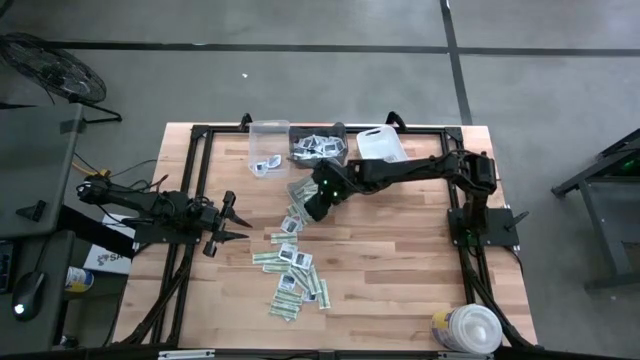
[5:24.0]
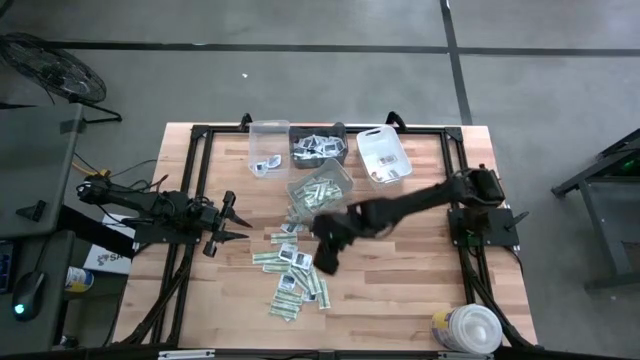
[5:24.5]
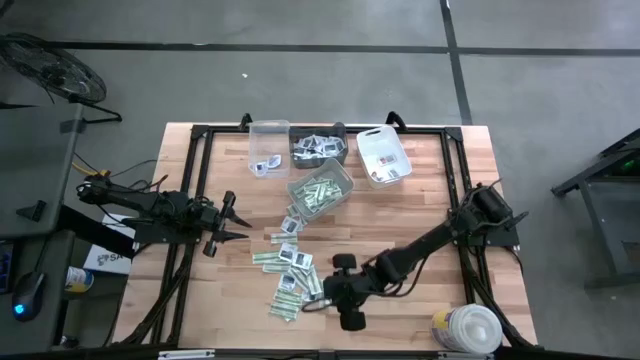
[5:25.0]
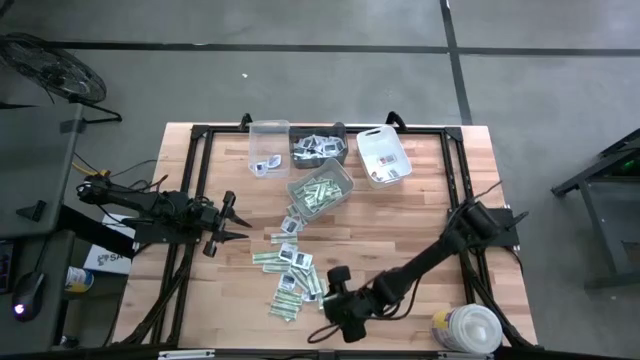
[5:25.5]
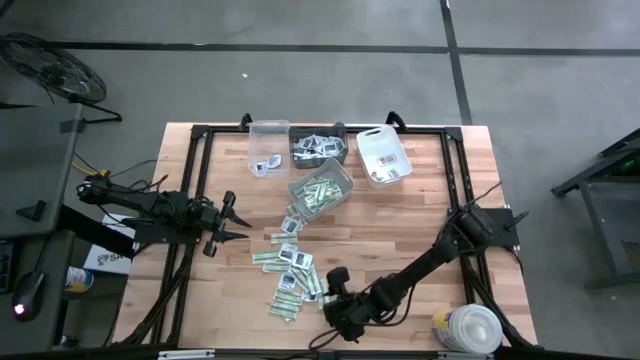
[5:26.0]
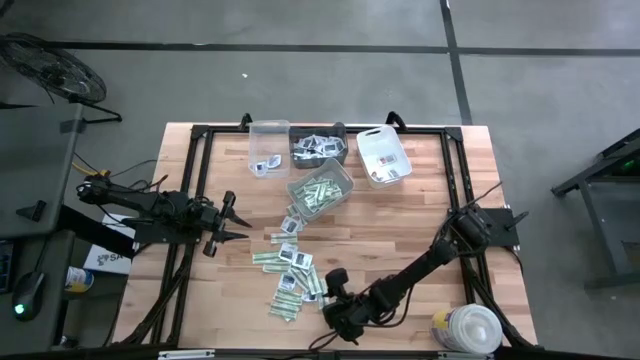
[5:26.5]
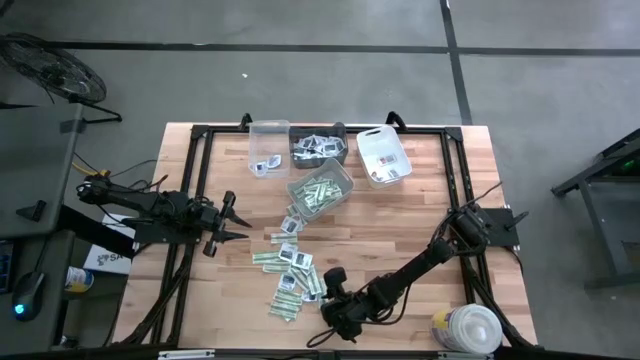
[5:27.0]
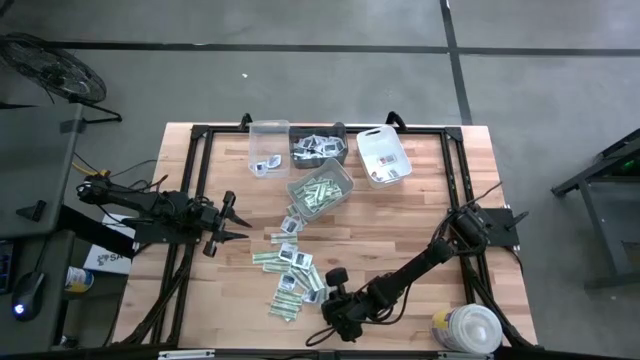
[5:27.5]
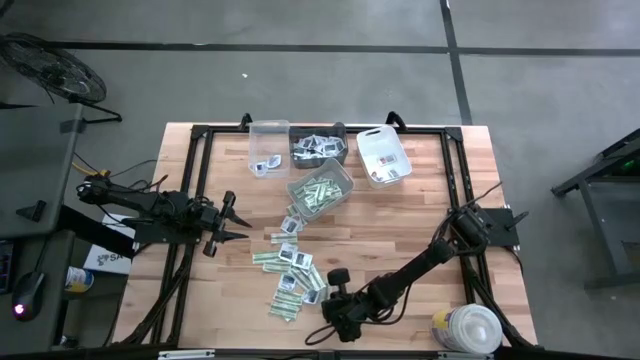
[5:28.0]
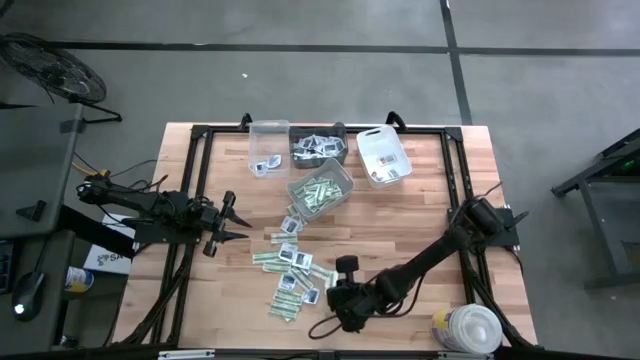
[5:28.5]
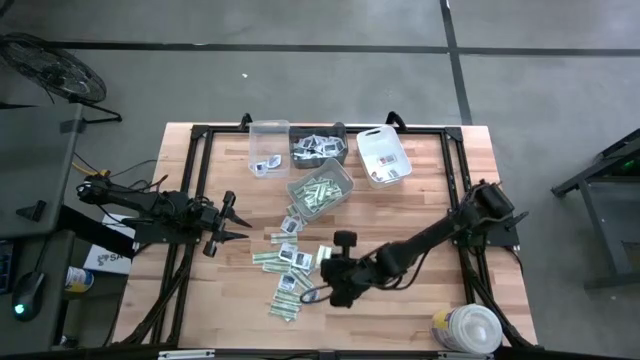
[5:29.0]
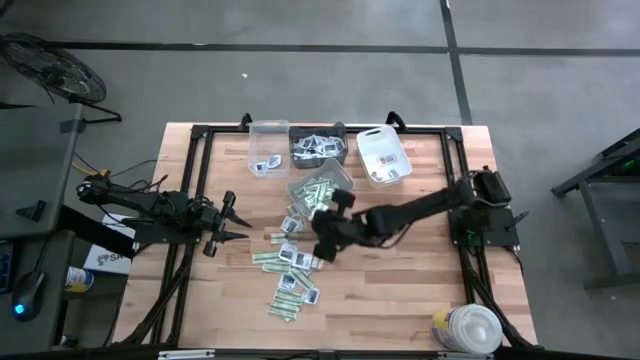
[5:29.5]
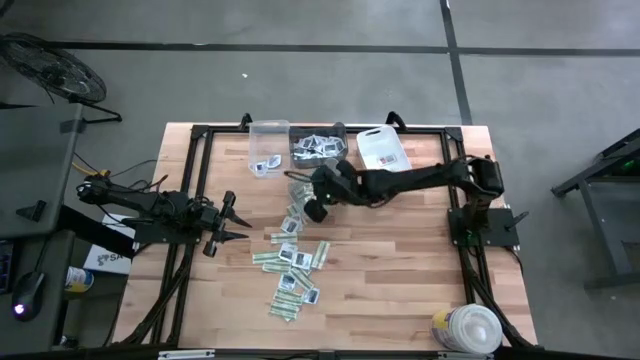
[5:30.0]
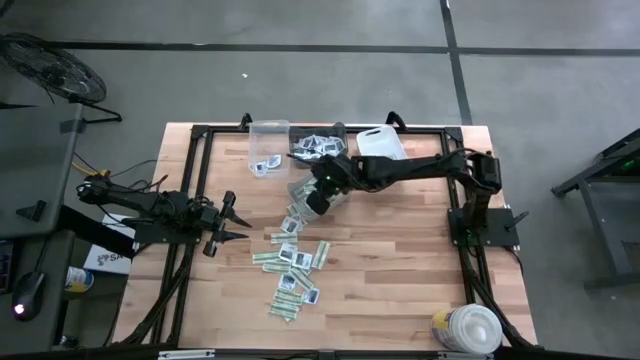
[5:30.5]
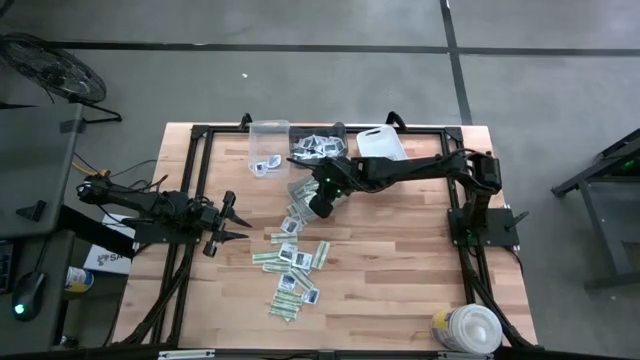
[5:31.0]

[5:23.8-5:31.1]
Task: Pick & Place First Aid Supplies
Put the bandage pack into the gray bin

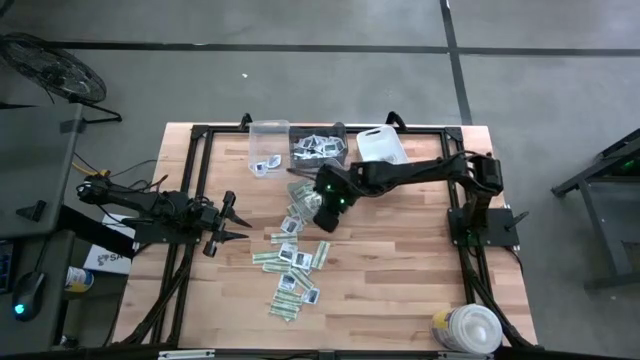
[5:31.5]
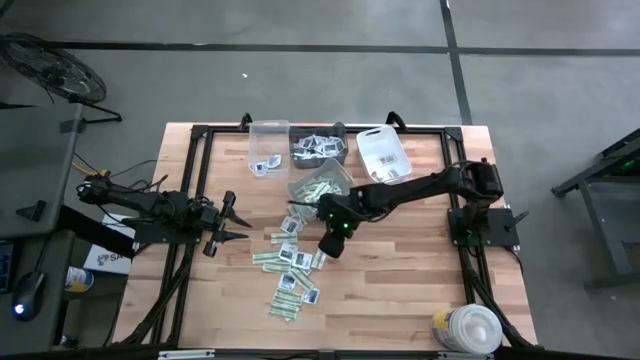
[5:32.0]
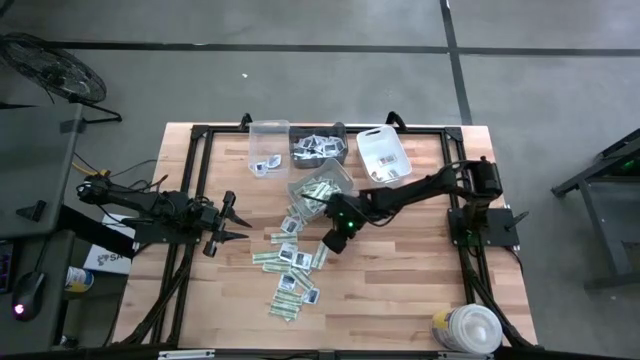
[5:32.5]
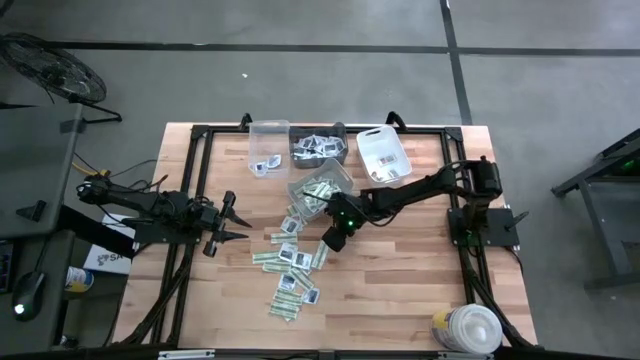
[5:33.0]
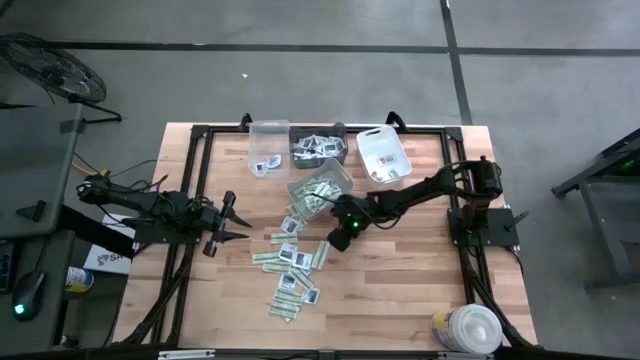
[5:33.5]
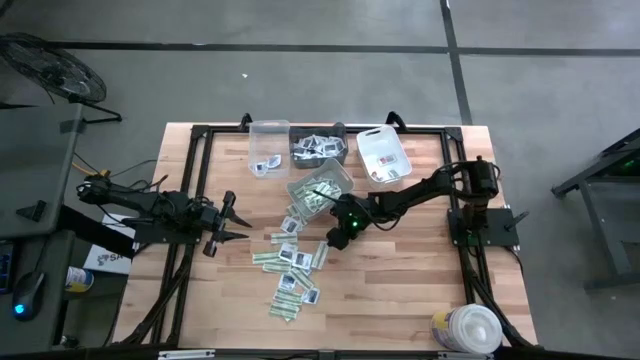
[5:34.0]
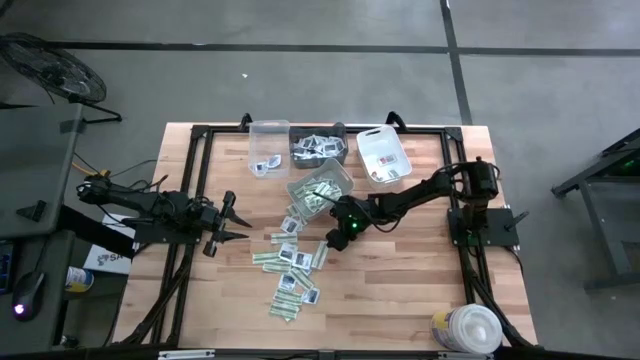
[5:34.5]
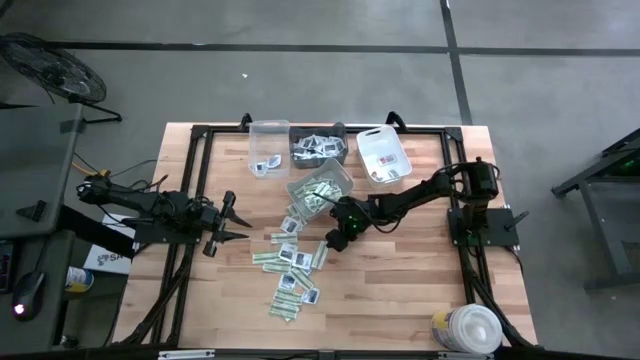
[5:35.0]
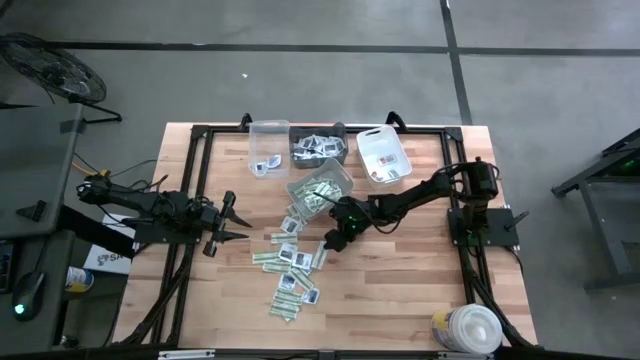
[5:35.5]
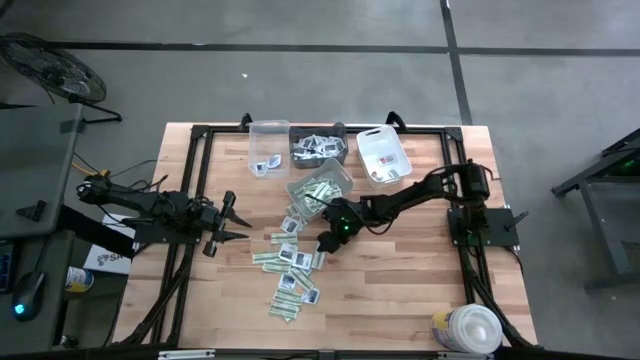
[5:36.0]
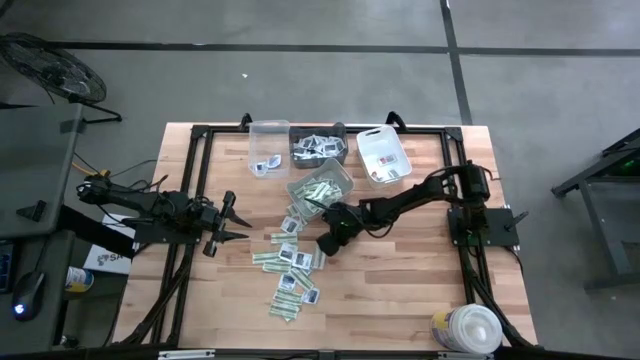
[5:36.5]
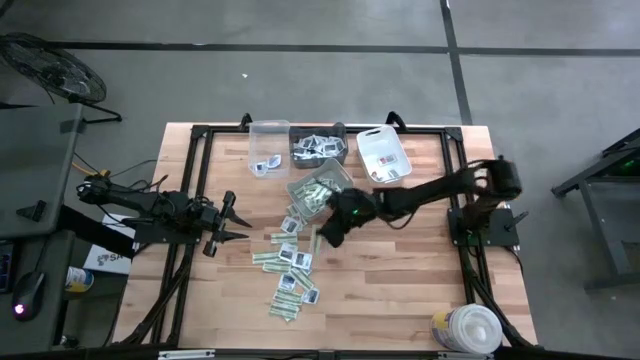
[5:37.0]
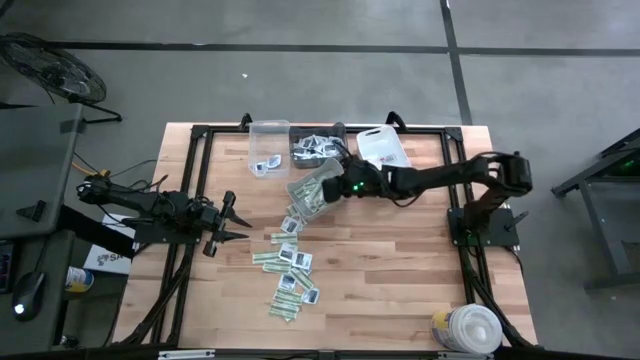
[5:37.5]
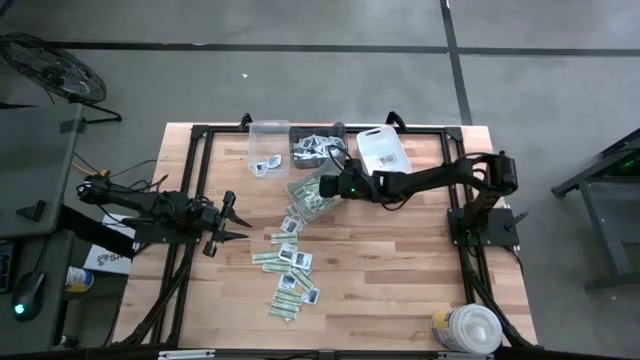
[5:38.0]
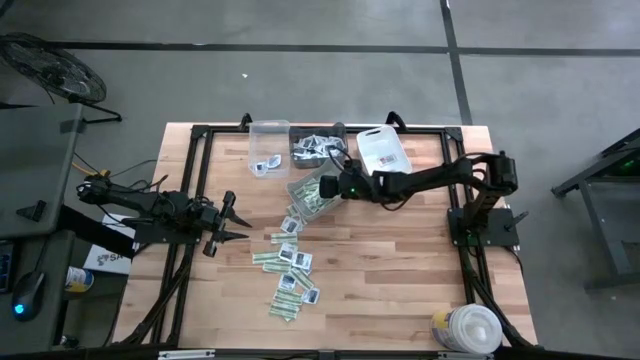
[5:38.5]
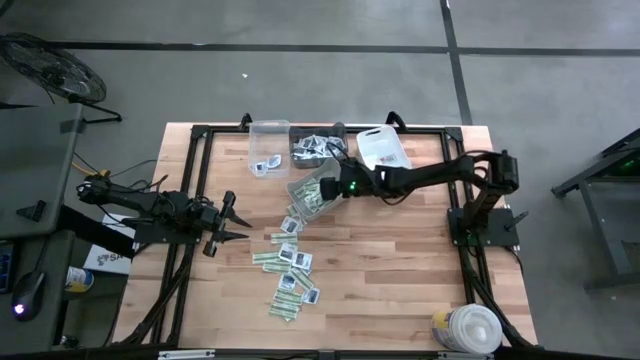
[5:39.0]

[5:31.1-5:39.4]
Put the bandage pack into the gray bin

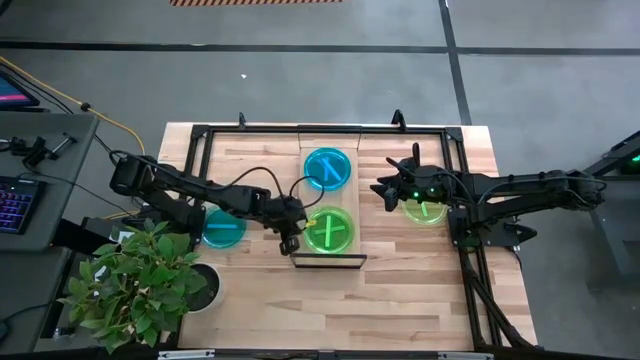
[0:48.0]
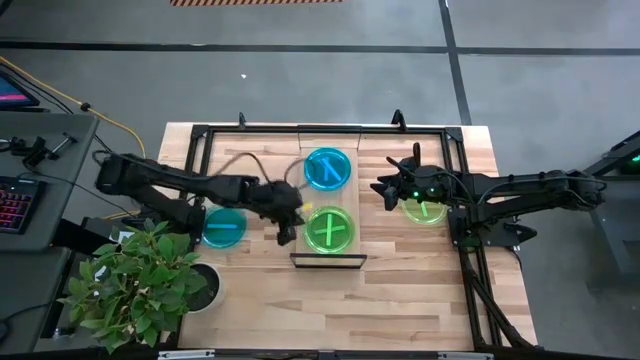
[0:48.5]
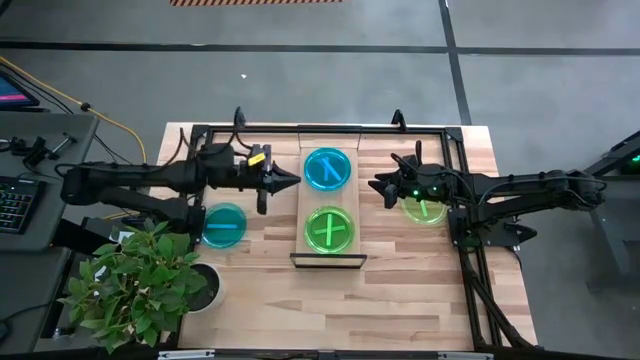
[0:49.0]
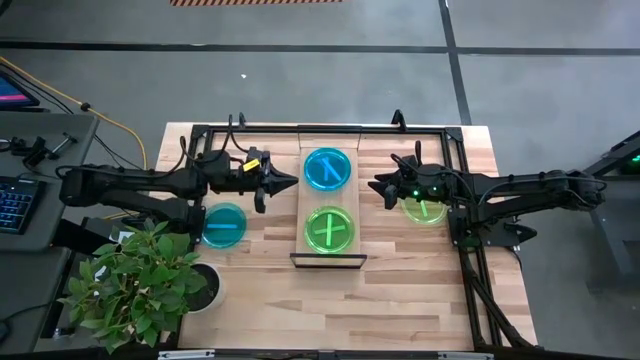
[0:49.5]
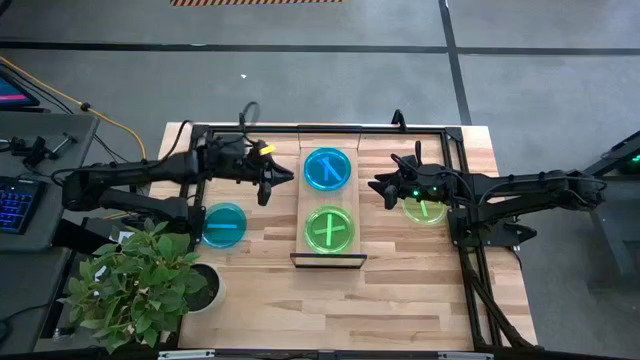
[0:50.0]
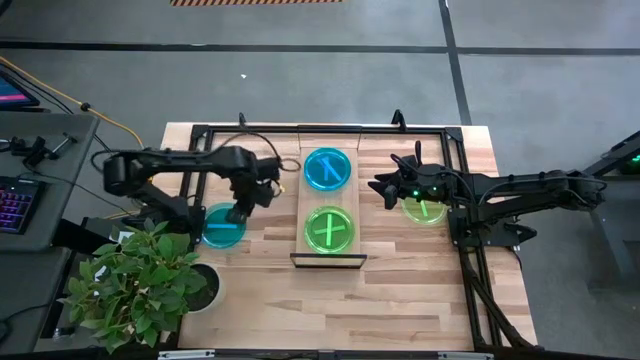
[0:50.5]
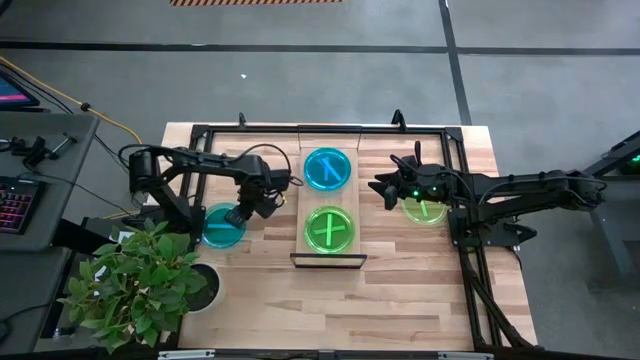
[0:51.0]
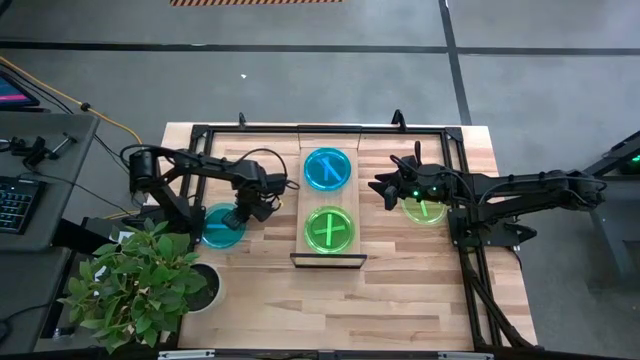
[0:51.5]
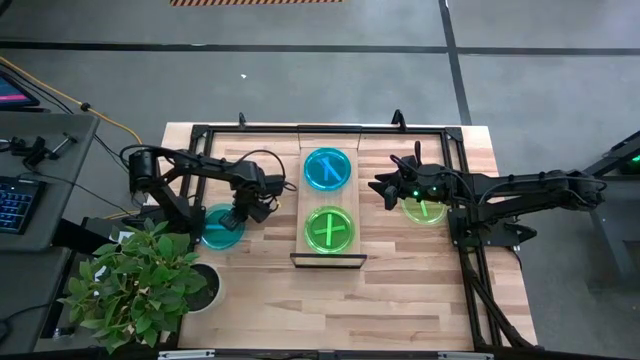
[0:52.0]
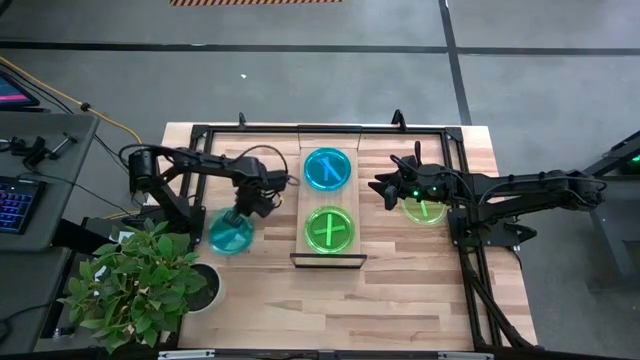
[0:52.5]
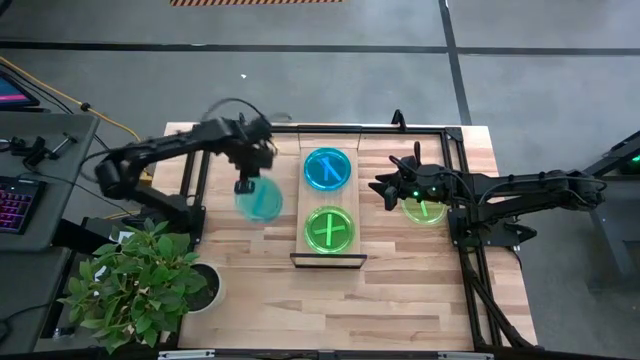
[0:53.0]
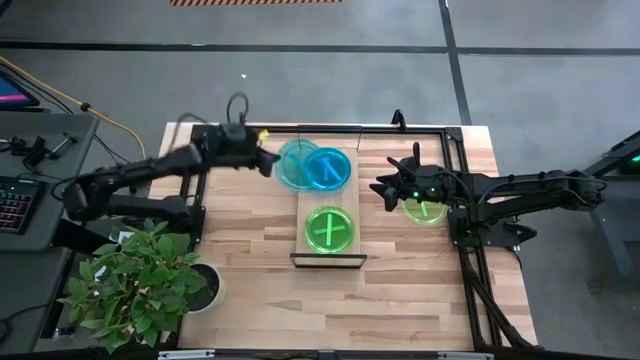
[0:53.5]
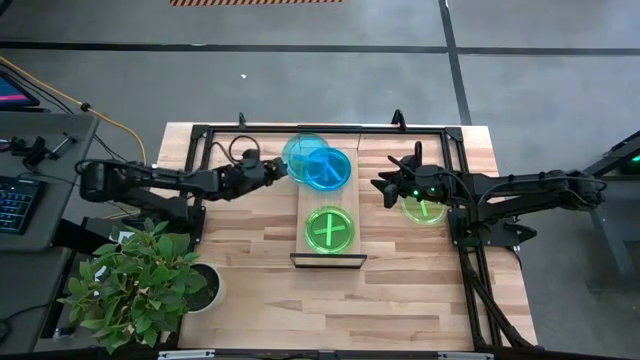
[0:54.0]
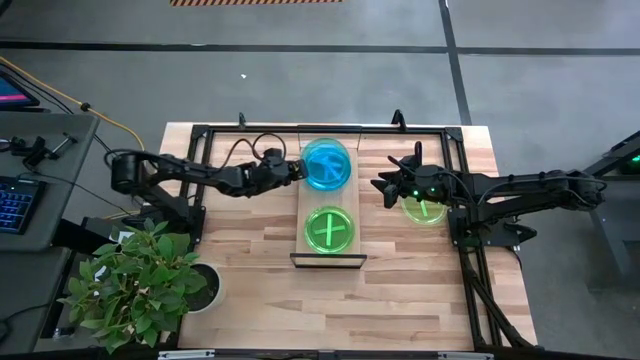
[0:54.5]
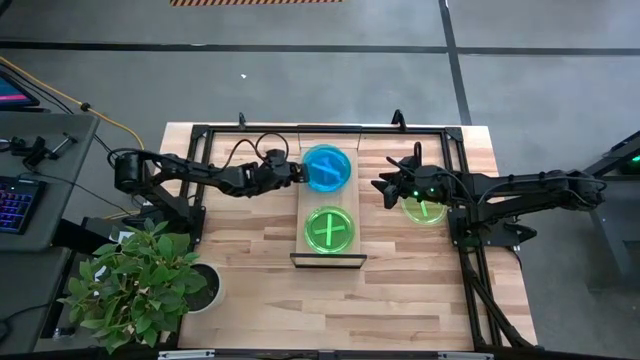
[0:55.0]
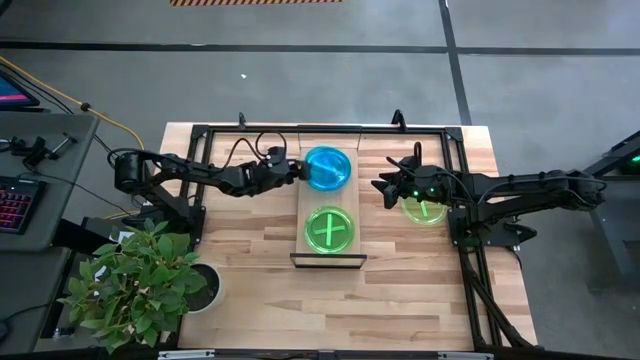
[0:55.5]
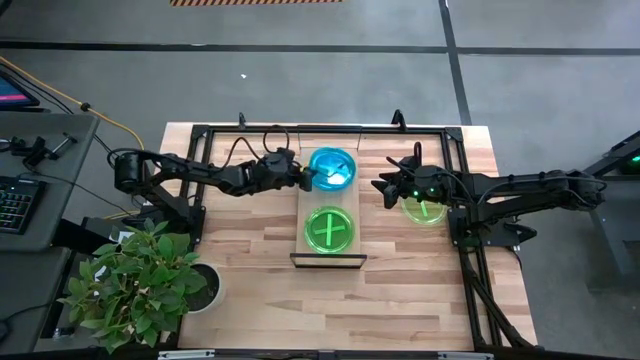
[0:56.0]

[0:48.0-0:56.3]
Task: Place and stack plates onto a shelf
Stack the blue plate on top of the blue plate on the shelf
